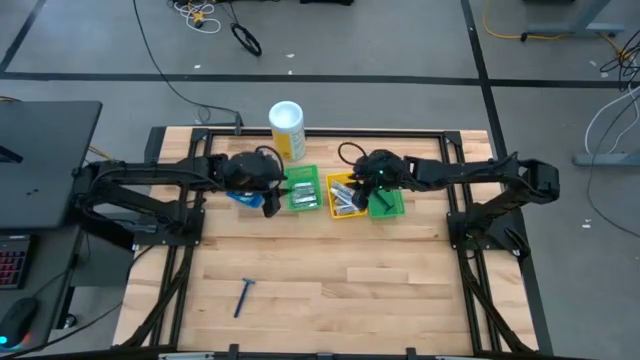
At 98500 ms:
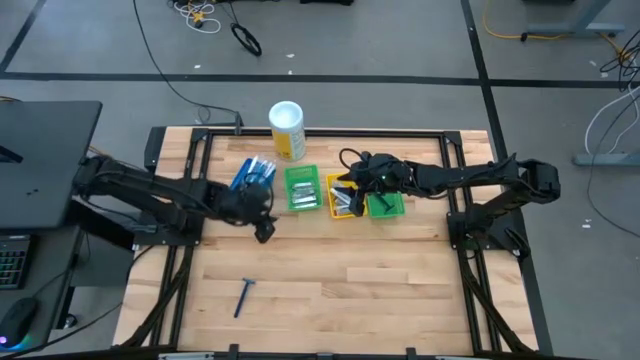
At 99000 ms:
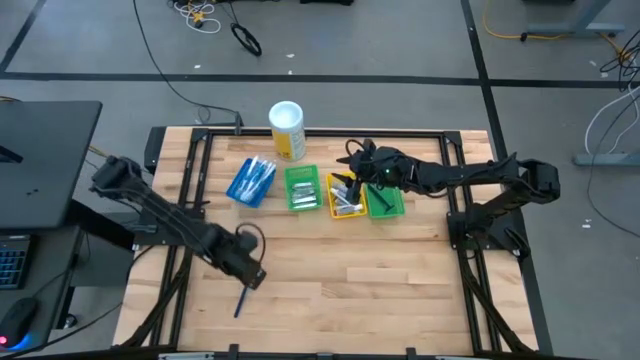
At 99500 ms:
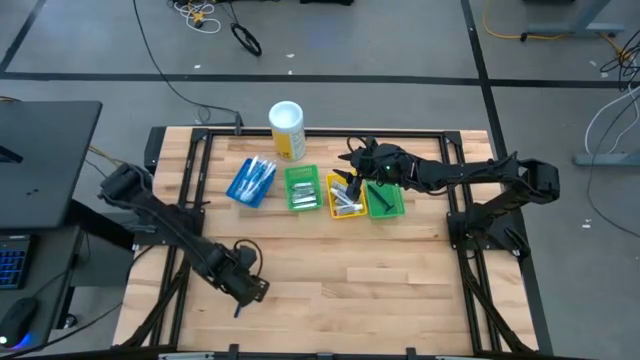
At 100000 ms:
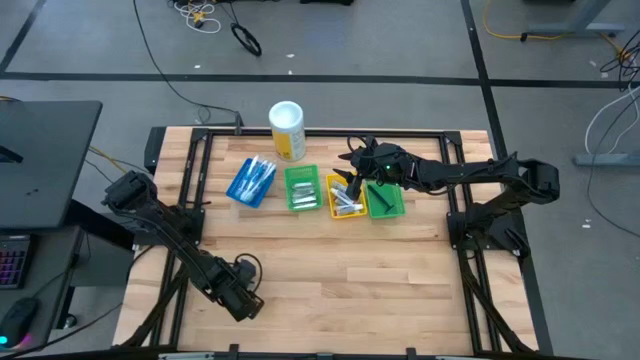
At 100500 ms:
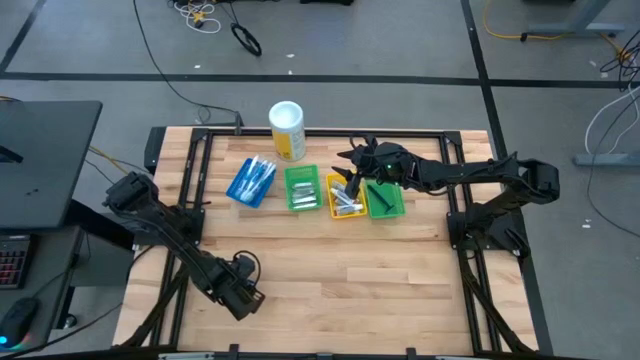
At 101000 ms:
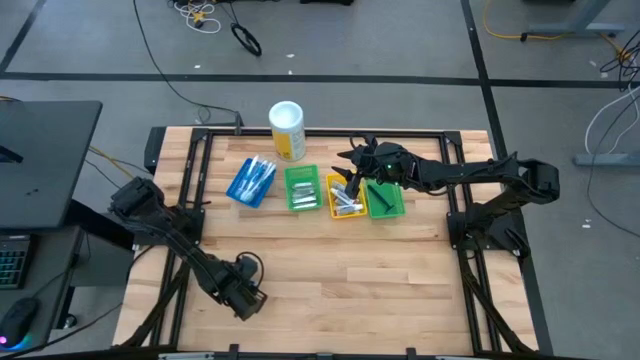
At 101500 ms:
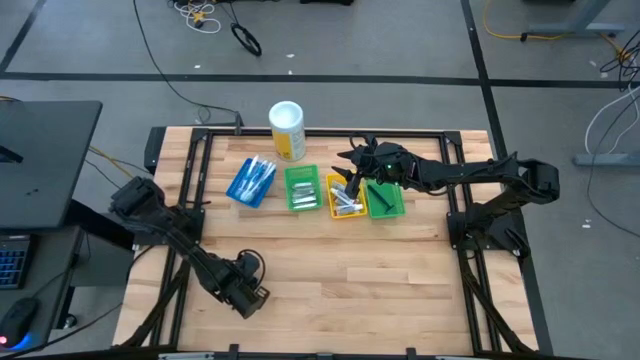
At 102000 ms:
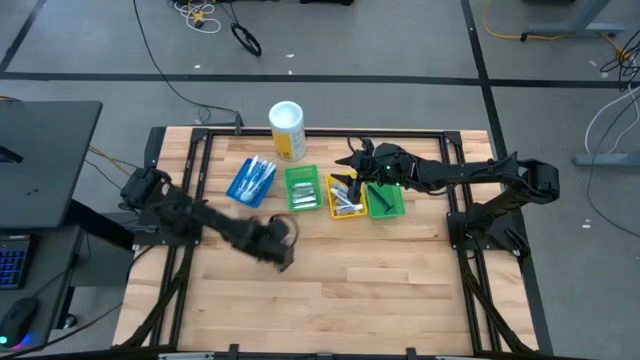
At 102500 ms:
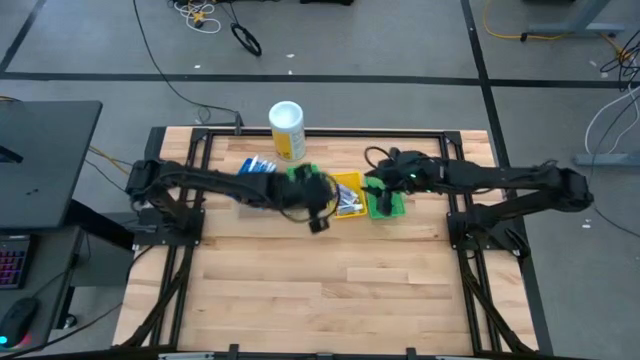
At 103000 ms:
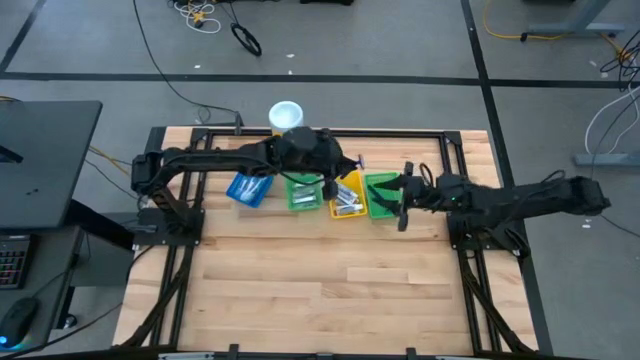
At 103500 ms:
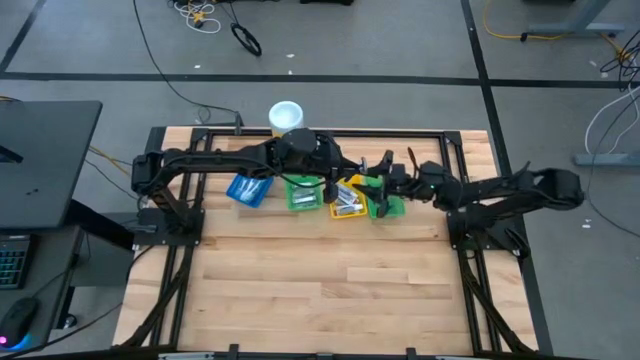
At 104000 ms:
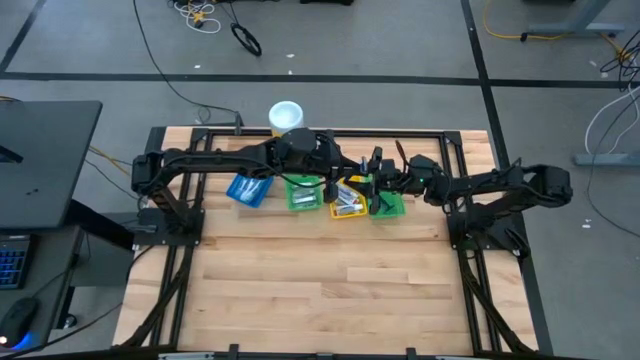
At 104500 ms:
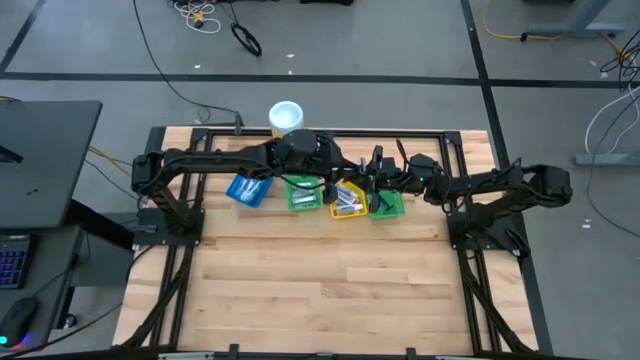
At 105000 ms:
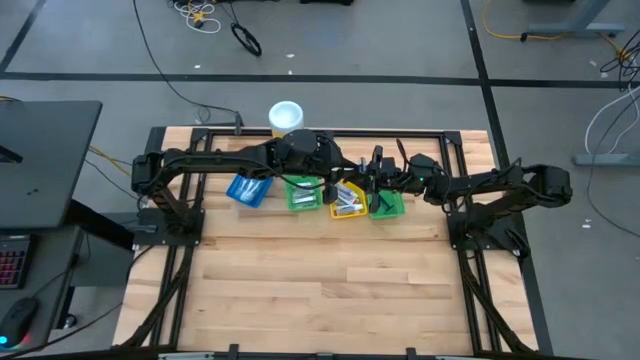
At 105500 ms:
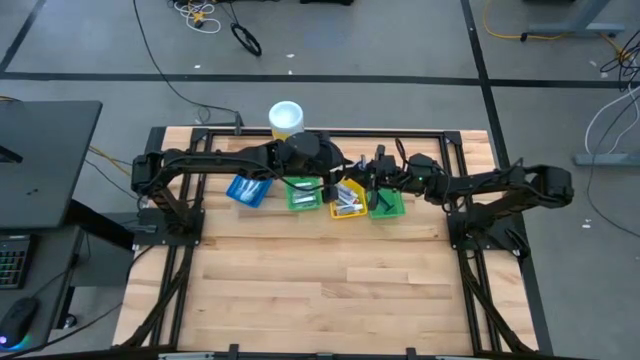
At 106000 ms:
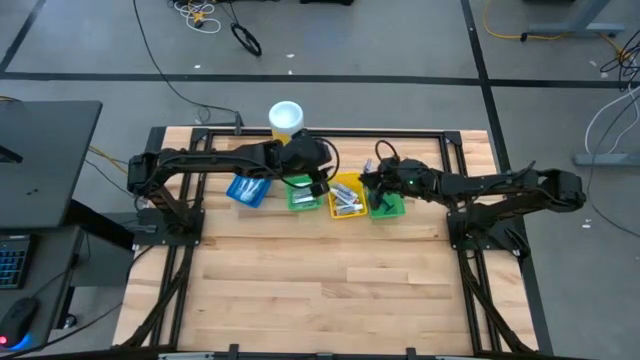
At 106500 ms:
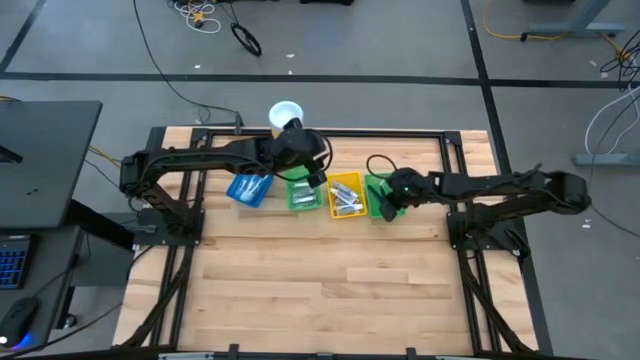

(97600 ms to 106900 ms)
Task: Pick & Place Travel size toiletries
Put the razor into the right green bin

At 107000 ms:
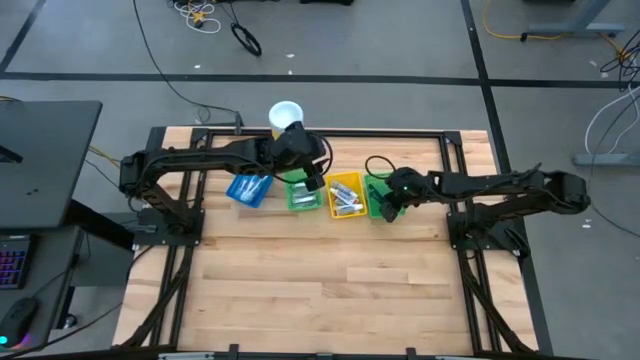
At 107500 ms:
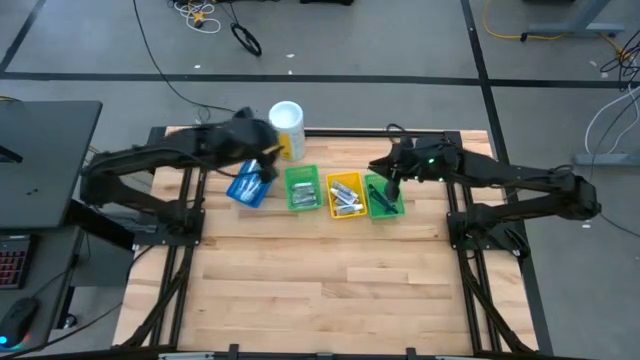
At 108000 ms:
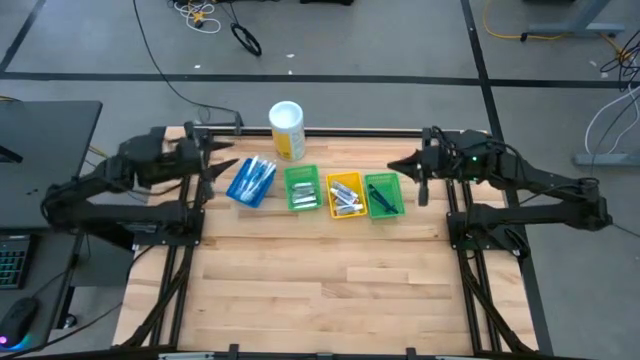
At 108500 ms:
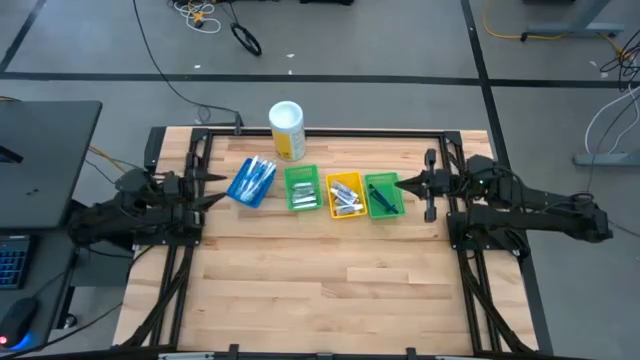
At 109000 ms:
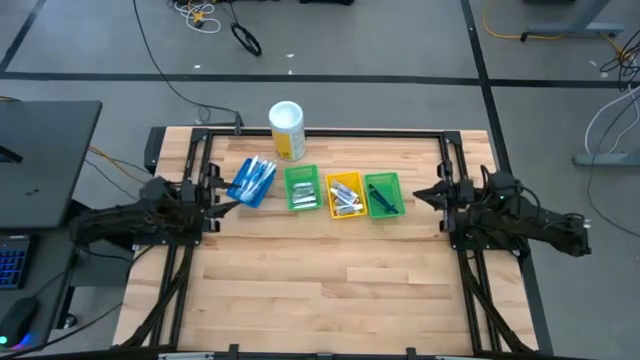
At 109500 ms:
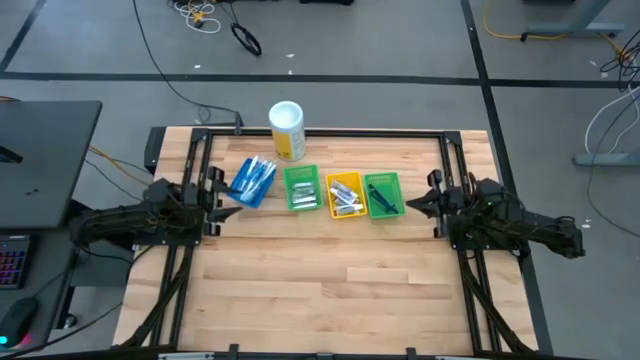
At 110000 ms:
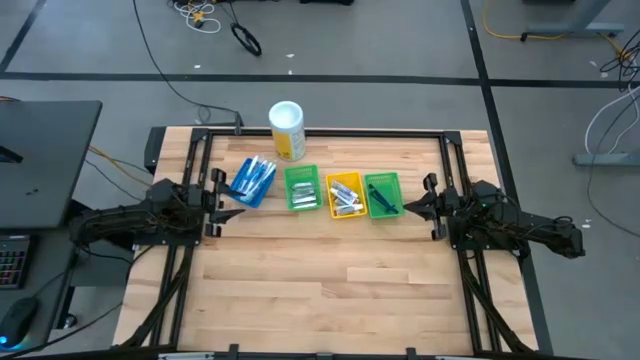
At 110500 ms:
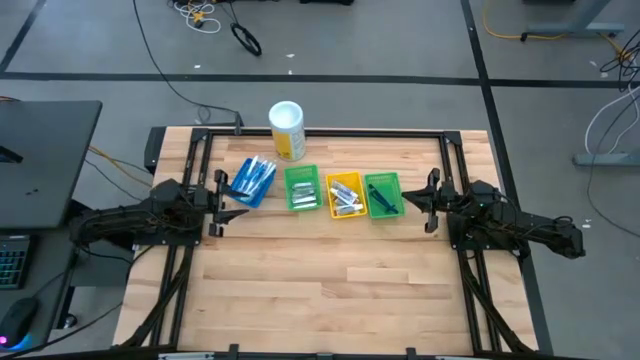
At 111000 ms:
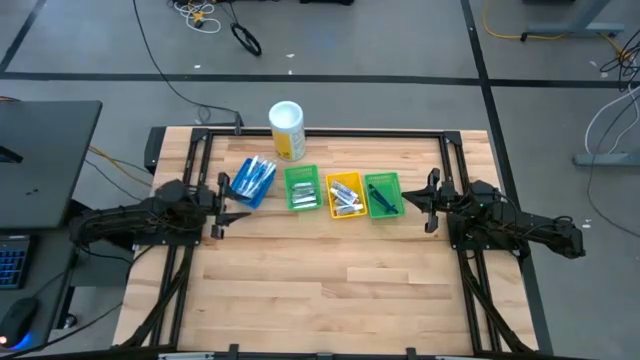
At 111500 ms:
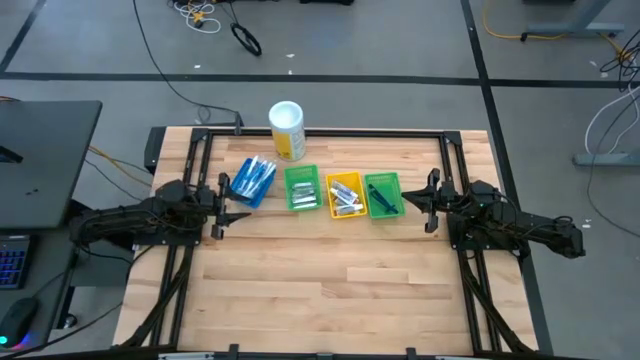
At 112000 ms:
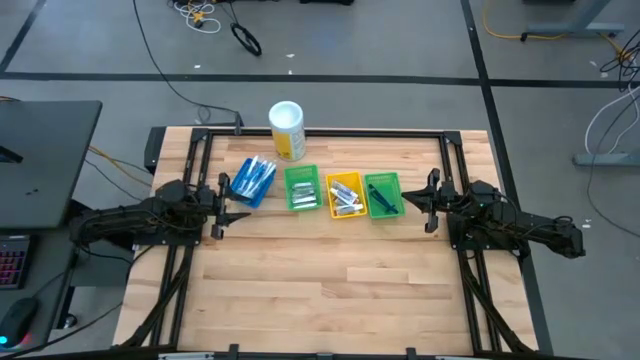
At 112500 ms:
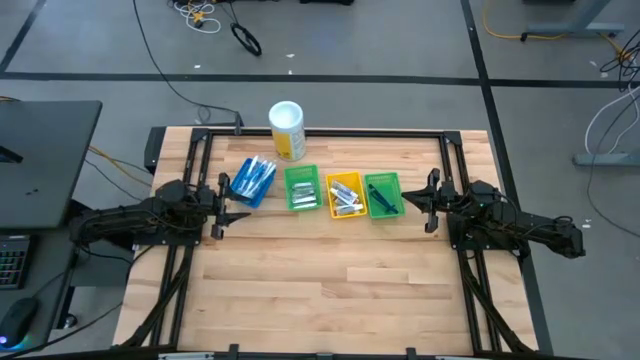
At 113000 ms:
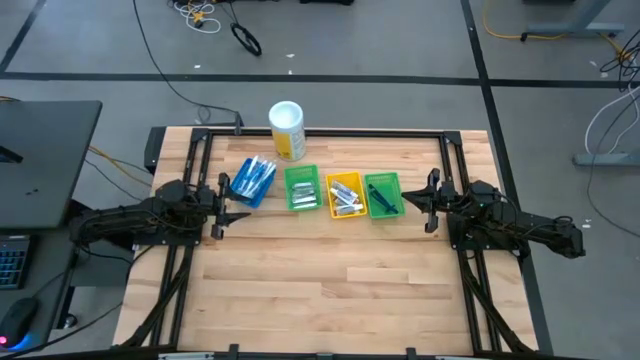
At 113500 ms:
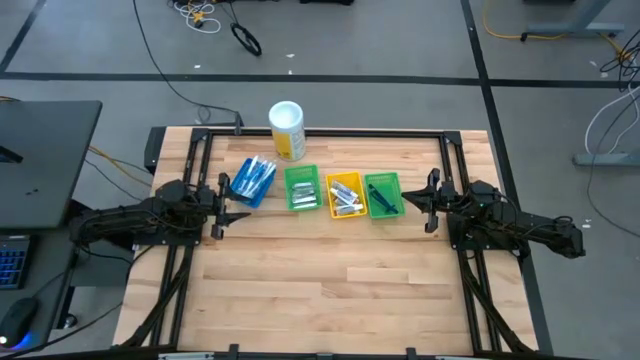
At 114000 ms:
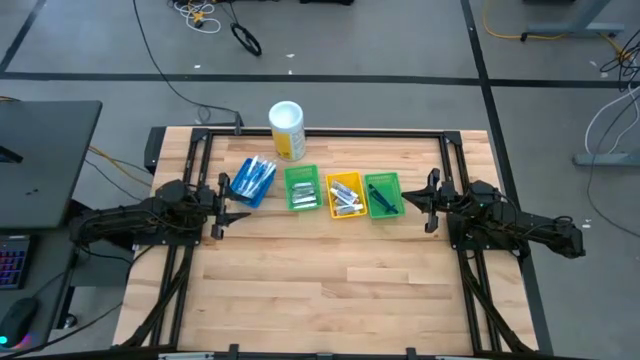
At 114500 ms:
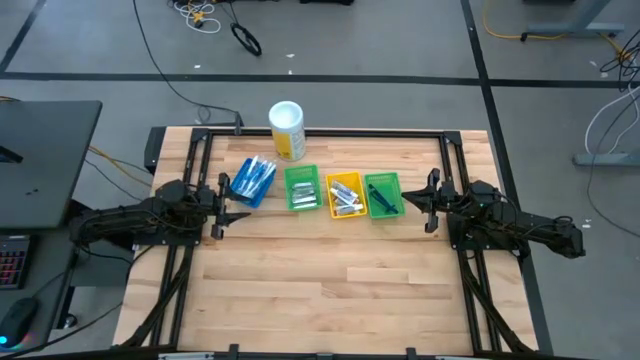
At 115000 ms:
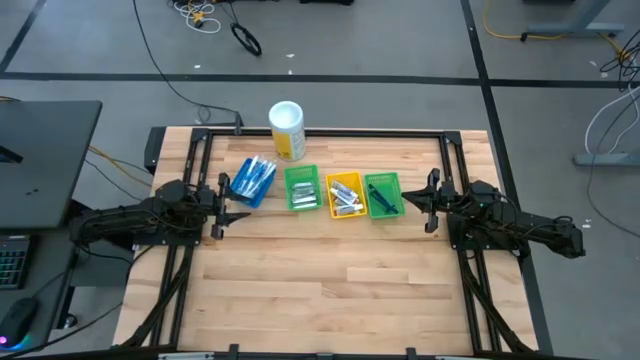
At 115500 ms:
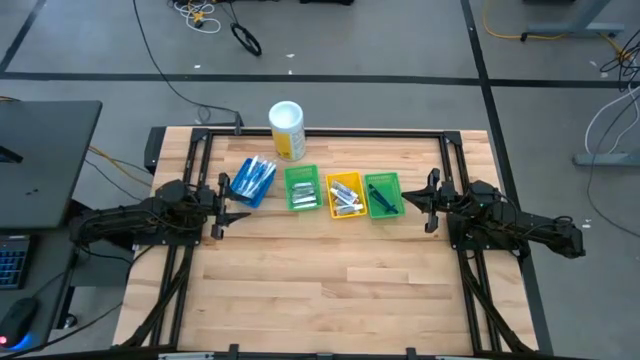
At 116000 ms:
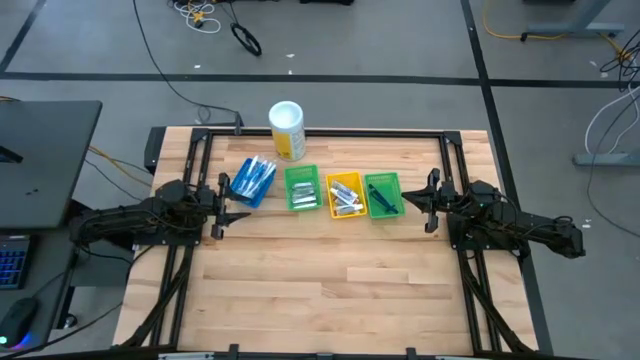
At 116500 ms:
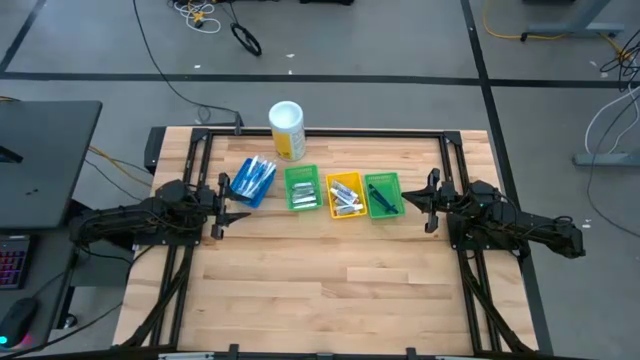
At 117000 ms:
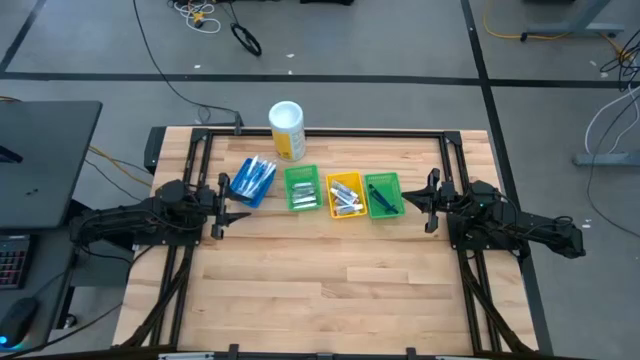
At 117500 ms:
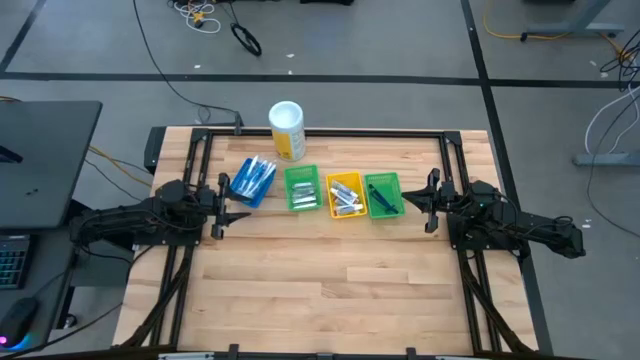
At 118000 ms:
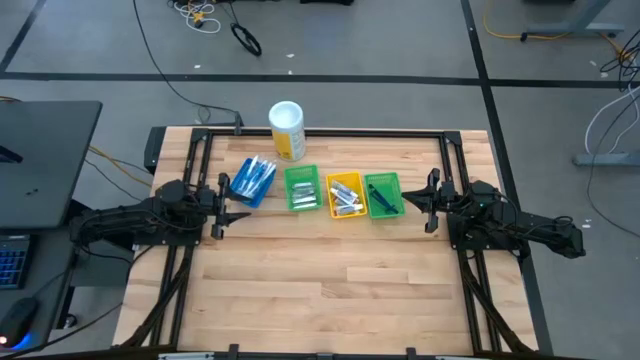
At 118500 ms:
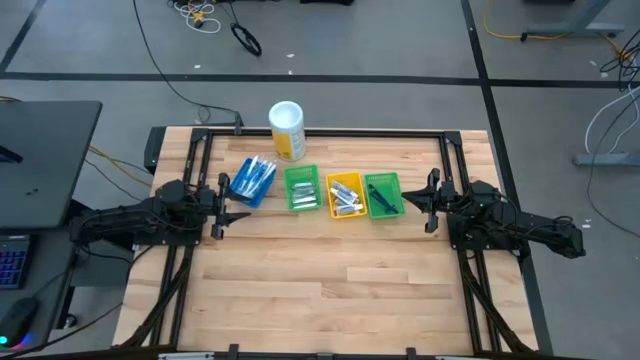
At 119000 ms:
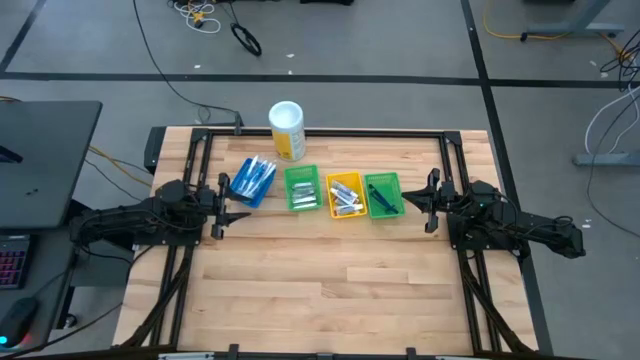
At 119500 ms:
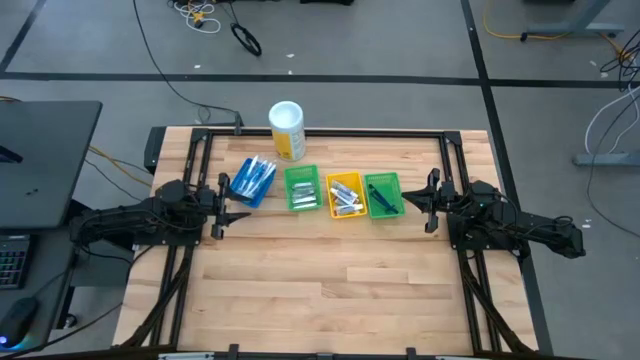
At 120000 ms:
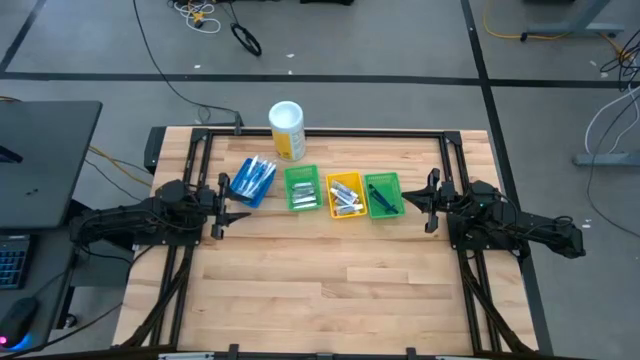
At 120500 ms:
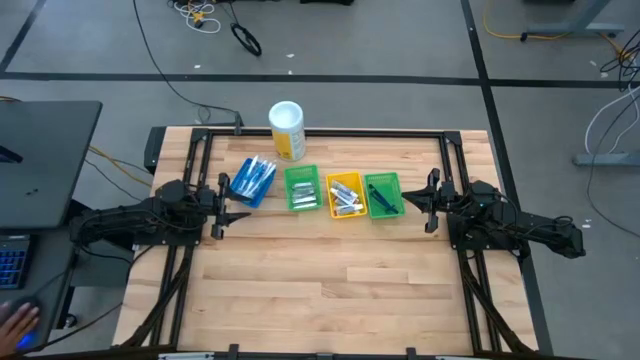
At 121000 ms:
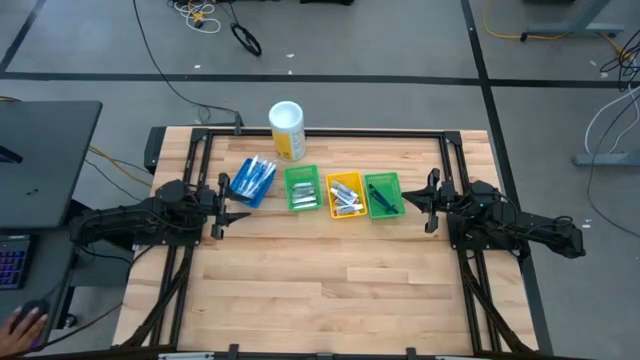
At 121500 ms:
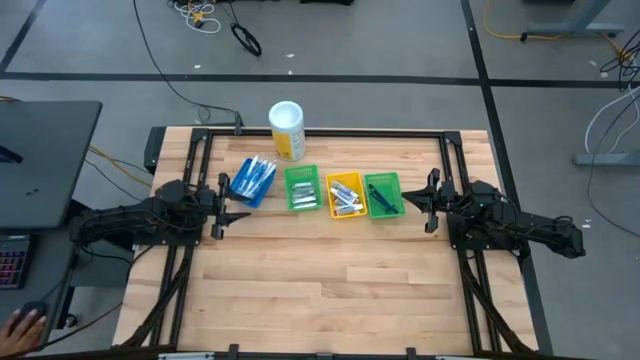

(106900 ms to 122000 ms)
Return to Home Position
